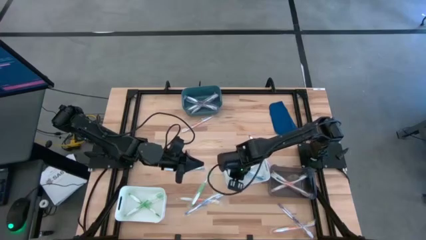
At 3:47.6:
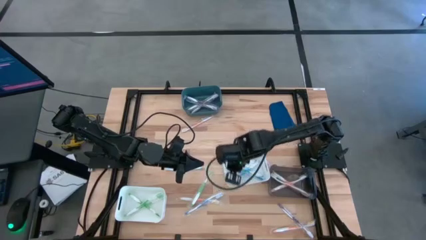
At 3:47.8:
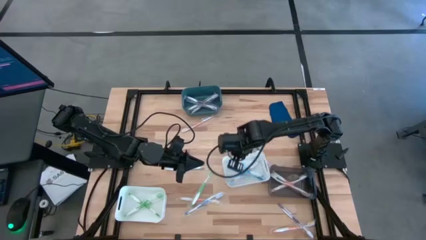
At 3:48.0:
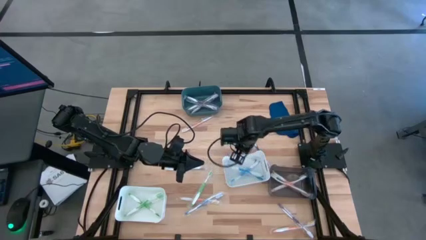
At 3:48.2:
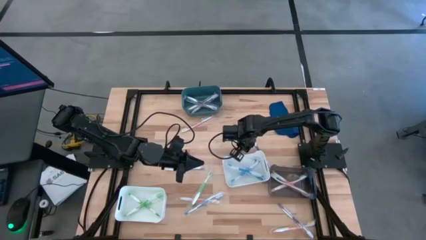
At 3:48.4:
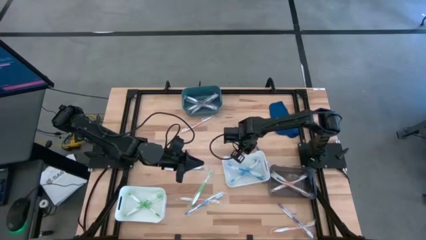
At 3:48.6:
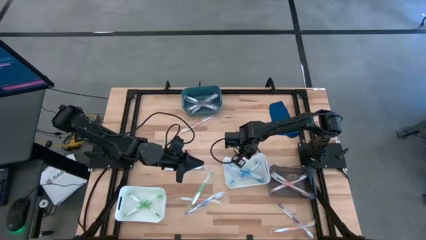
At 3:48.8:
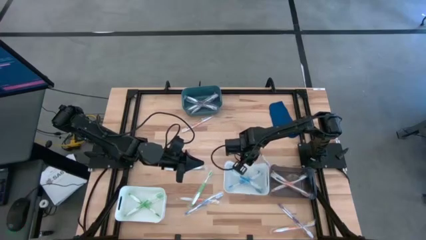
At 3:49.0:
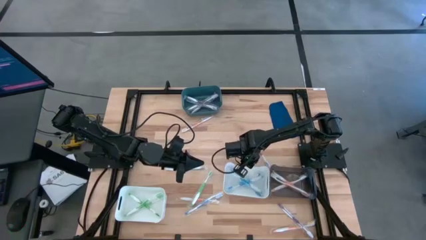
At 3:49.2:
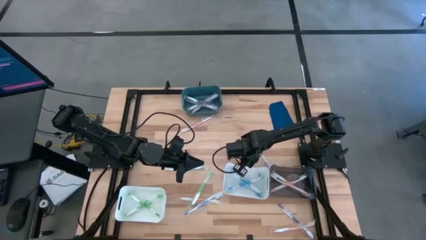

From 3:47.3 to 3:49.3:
Task: Pick & Place Toothbrushes
Adjust the white bin on the table

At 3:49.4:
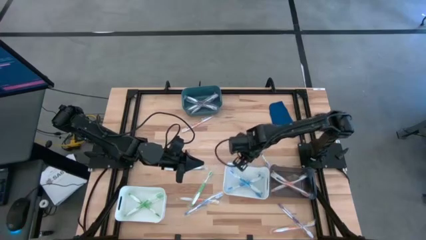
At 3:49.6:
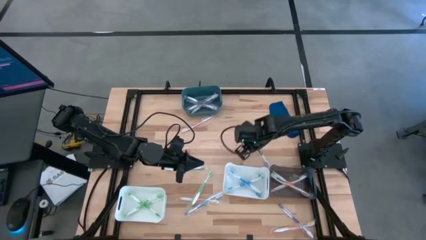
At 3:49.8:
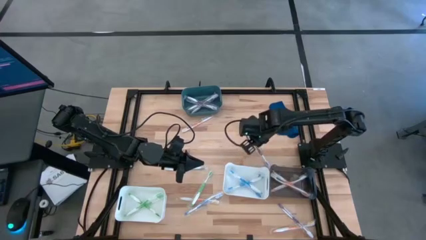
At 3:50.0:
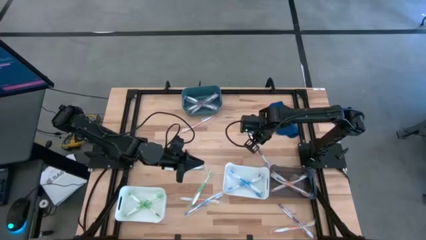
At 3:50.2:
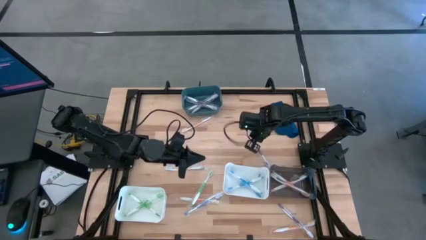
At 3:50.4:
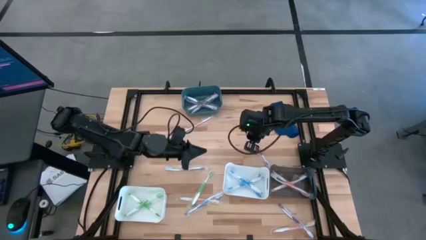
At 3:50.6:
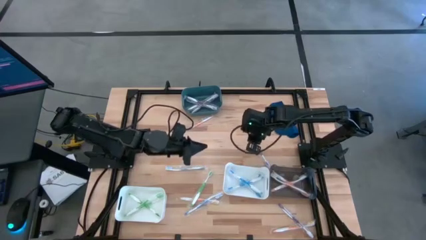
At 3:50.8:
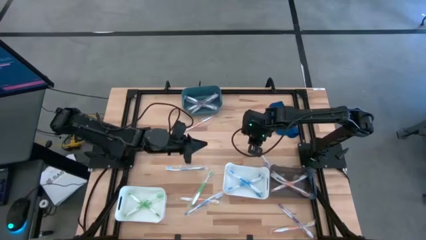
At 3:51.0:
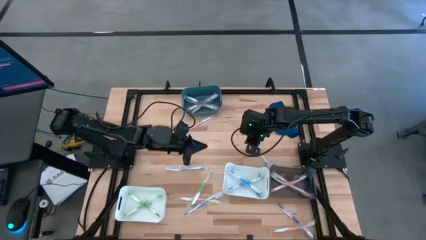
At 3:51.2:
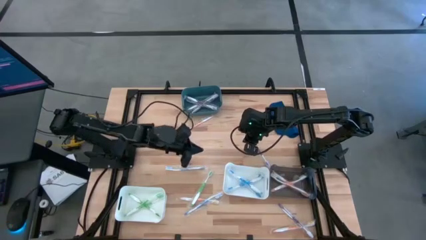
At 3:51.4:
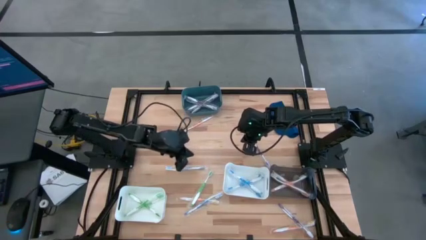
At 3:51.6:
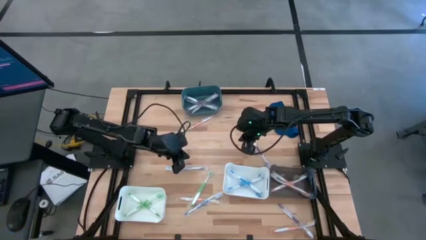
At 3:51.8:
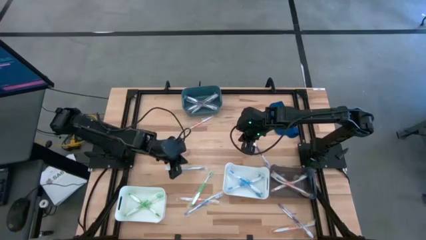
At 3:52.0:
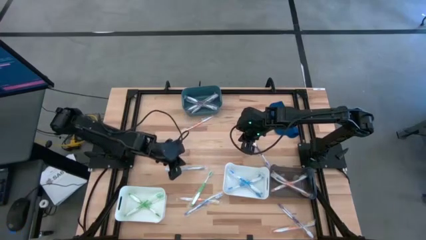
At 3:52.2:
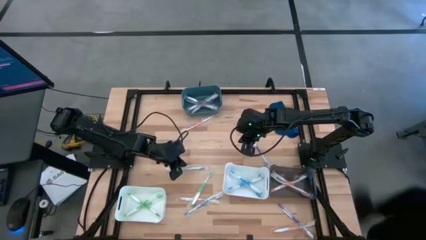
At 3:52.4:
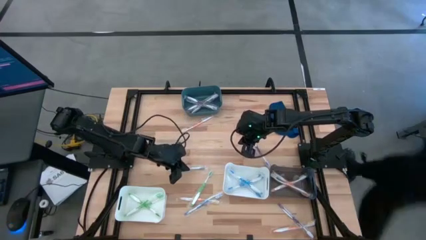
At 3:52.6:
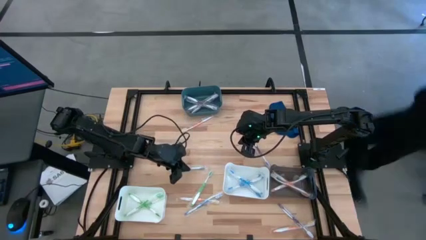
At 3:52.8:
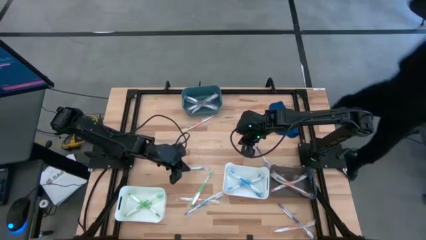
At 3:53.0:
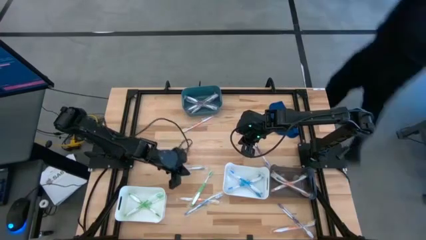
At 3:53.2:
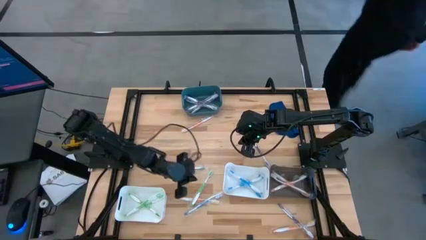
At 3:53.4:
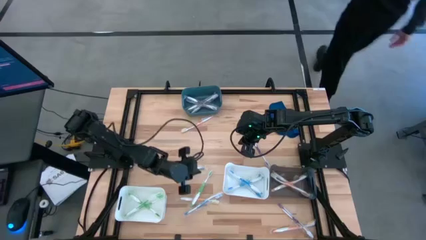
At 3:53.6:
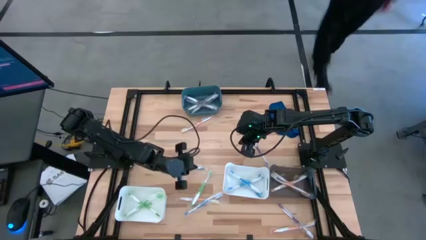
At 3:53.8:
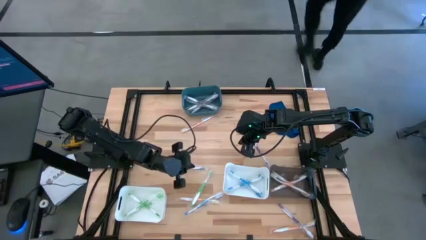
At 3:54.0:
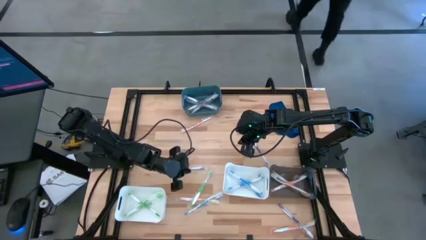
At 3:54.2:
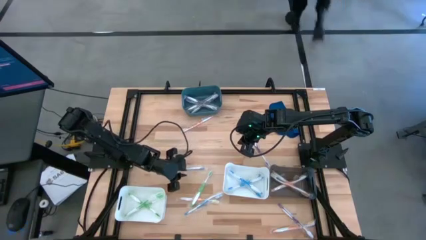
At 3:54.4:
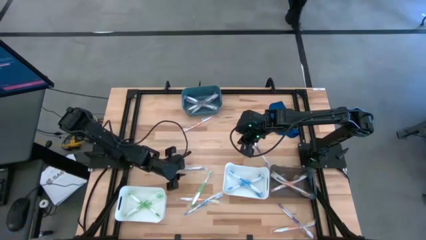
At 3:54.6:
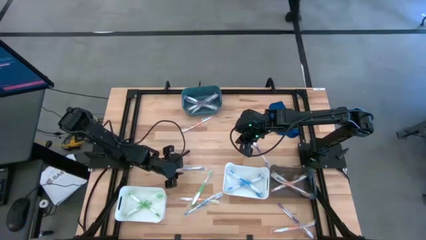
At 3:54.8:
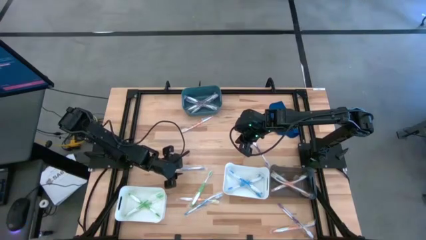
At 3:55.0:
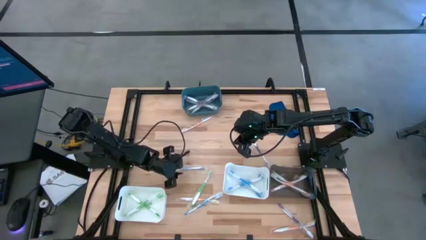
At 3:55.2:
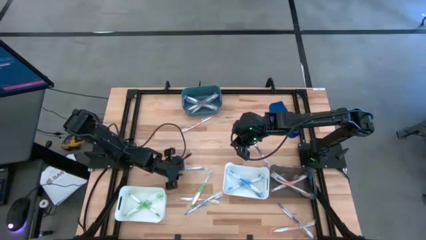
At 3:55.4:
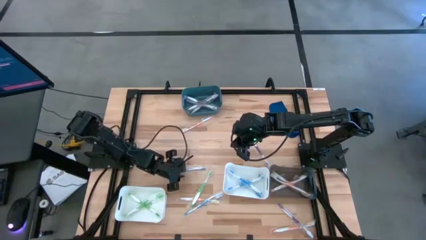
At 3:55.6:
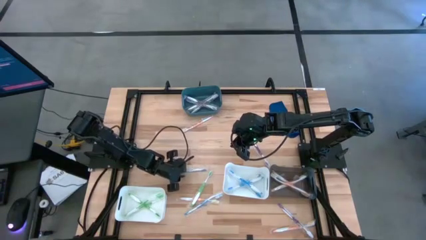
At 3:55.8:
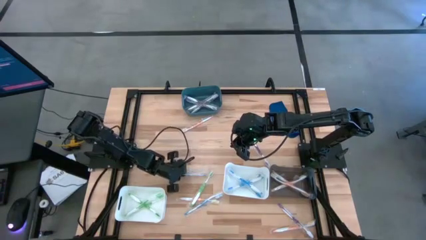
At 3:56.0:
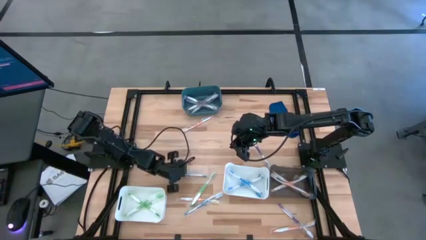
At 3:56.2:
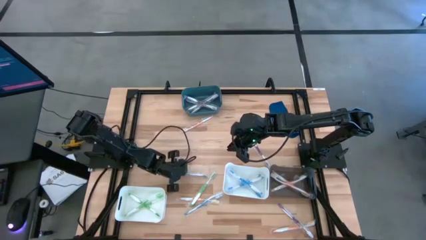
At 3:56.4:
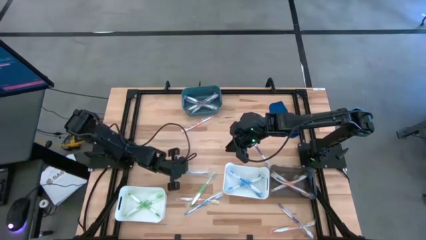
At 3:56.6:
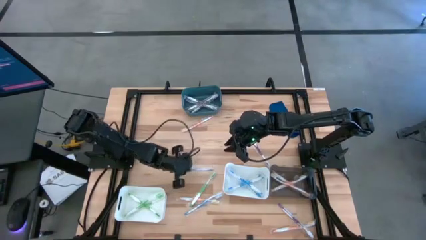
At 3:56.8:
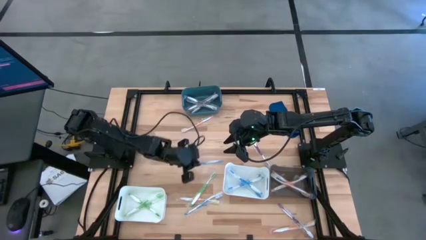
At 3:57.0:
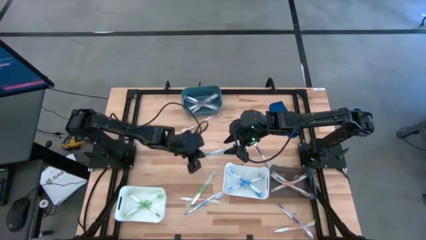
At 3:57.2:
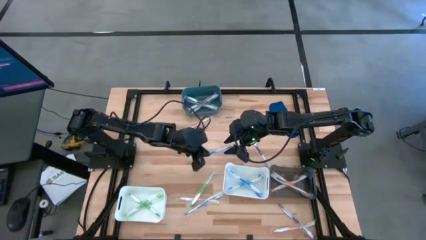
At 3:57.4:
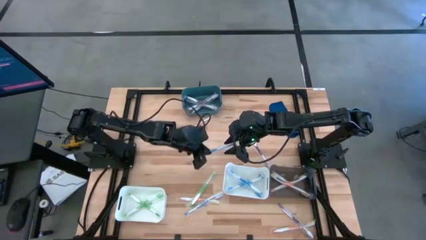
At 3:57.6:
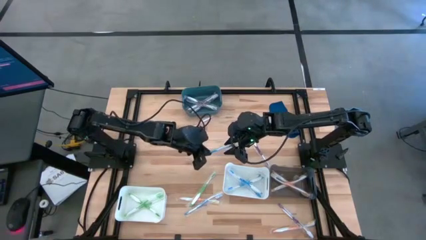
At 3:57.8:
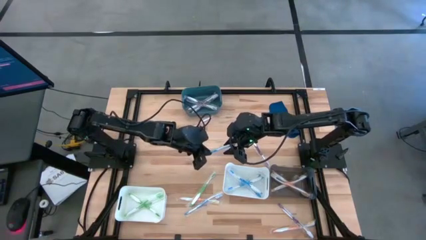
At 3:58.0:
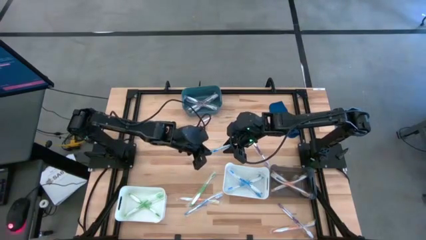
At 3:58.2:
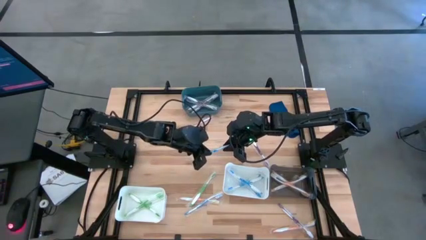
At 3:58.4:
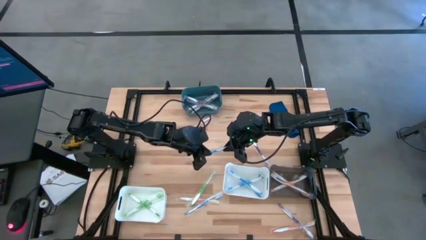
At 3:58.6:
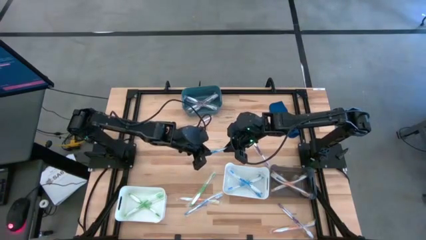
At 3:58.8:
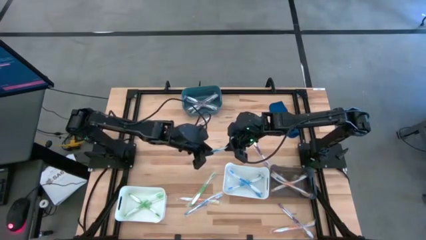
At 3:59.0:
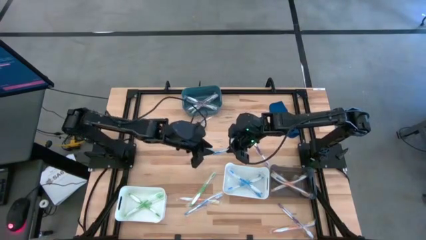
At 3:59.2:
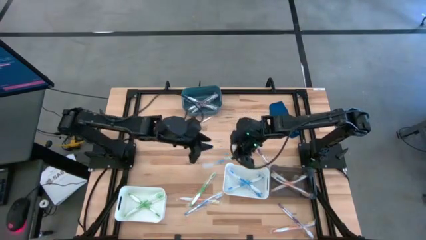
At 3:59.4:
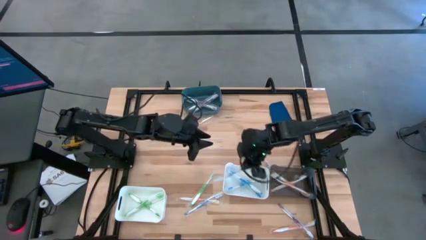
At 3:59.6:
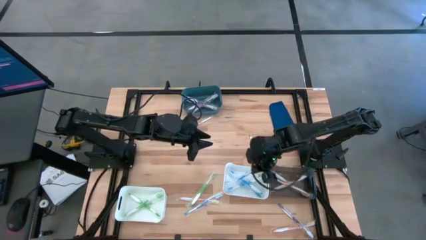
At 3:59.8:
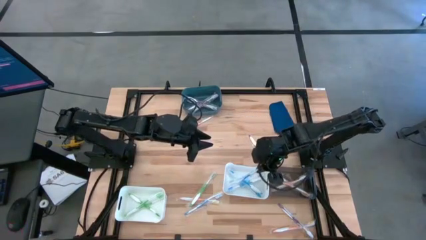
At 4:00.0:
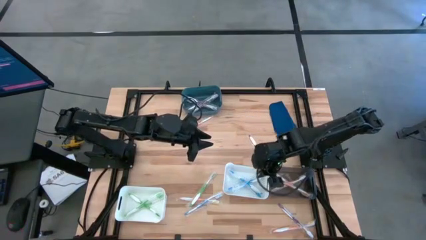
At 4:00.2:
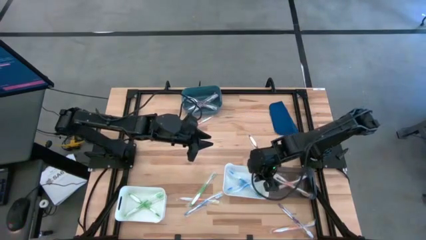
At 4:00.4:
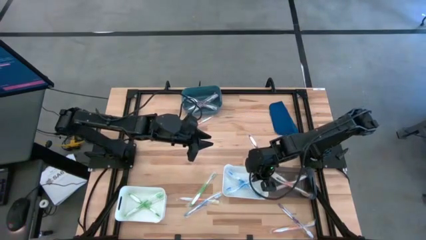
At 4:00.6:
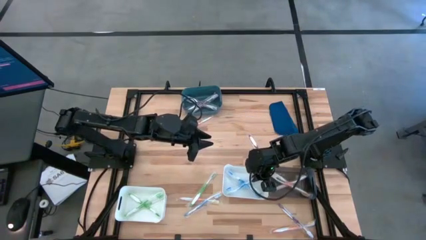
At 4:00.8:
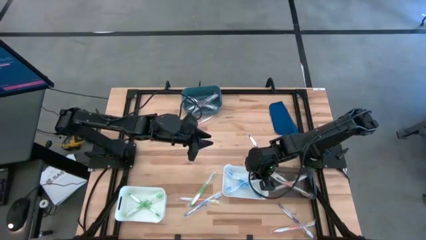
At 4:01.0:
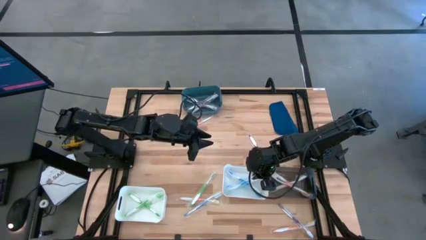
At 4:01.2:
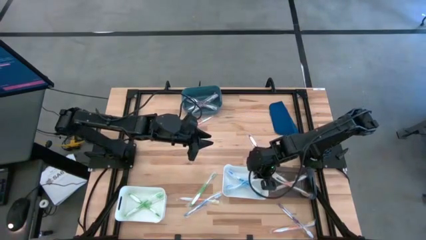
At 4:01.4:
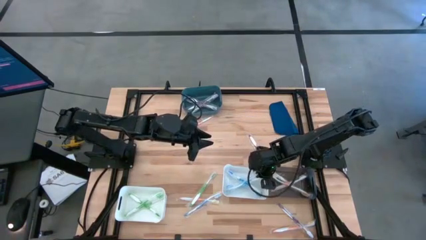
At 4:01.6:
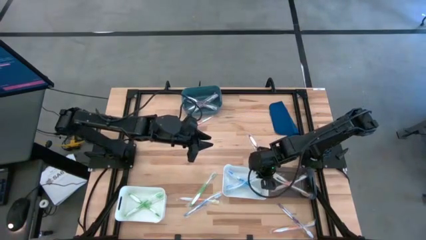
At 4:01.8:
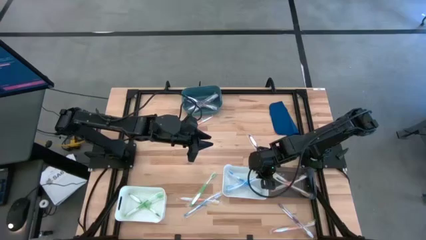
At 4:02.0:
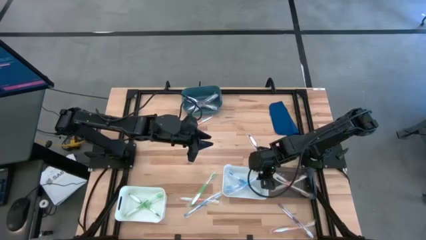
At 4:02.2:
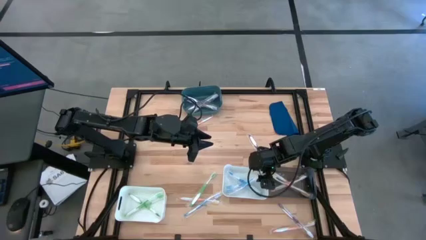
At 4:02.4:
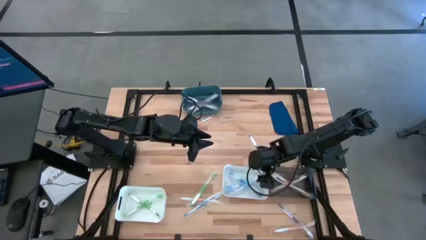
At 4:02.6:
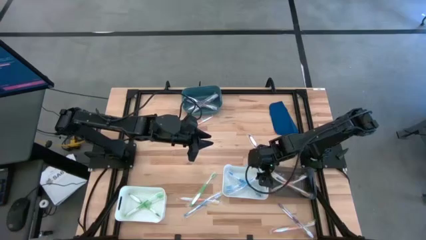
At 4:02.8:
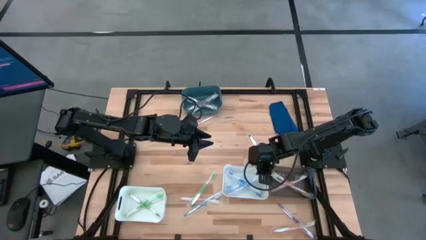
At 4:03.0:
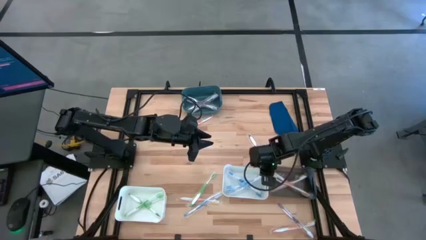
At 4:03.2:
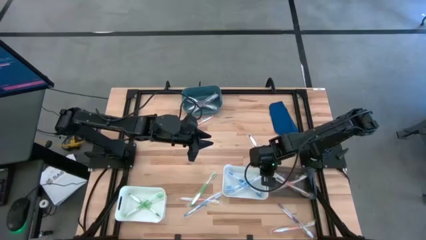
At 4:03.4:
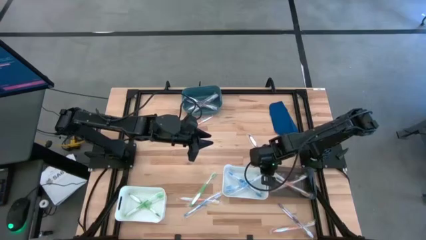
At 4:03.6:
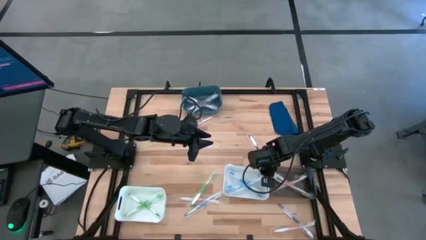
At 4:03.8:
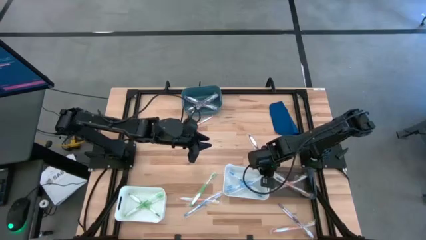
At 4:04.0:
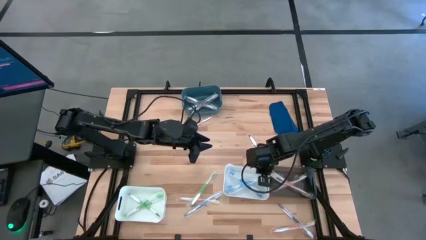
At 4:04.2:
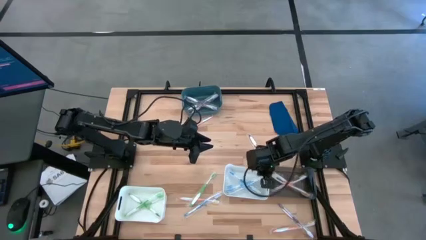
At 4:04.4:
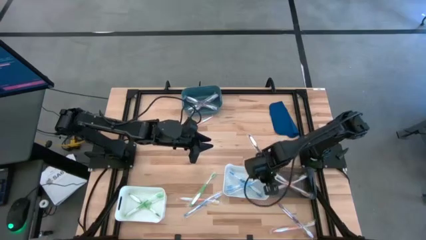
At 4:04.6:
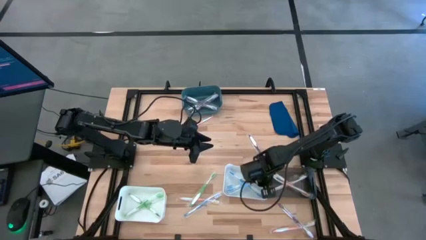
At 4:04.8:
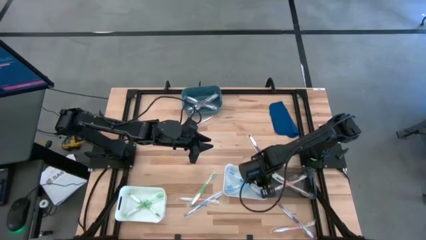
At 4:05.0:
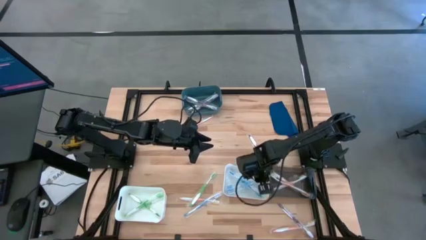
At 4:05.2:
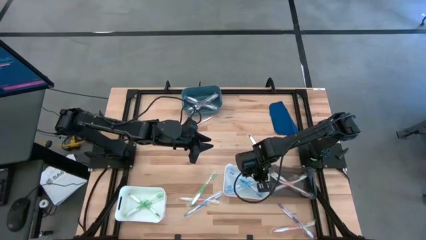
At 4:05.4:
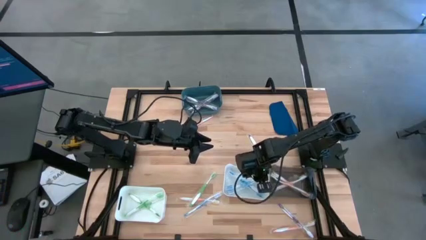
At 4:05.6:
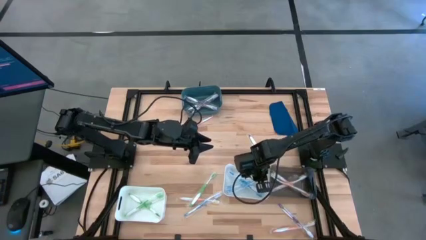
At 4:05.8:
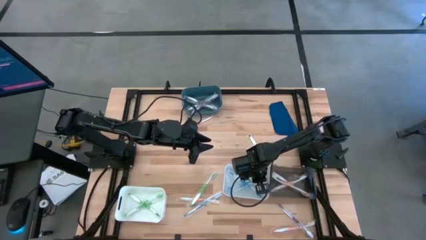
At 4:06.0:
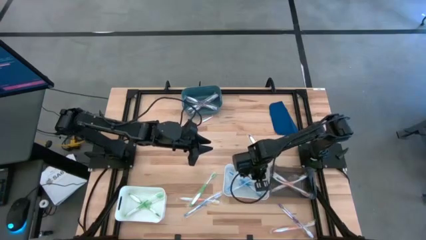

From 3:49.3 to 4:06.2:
Put the blue toothbrush into the top white bin
